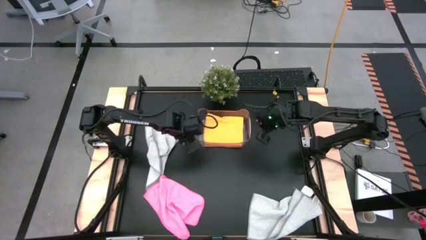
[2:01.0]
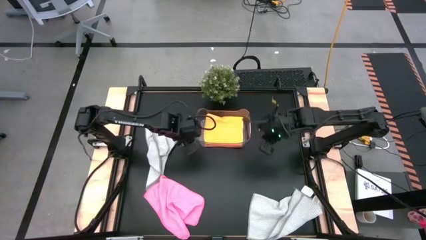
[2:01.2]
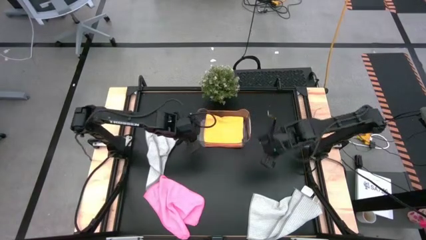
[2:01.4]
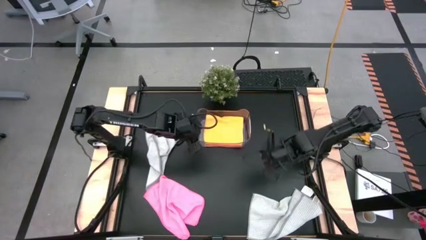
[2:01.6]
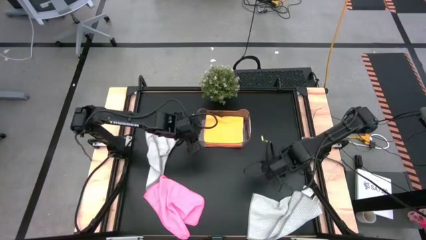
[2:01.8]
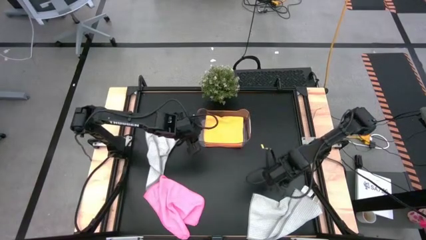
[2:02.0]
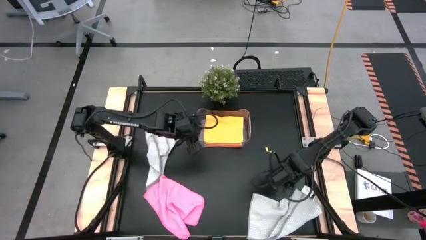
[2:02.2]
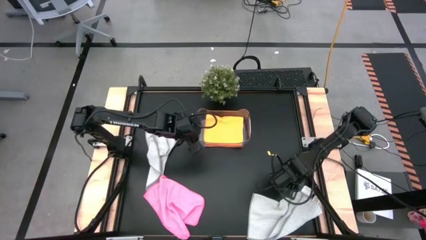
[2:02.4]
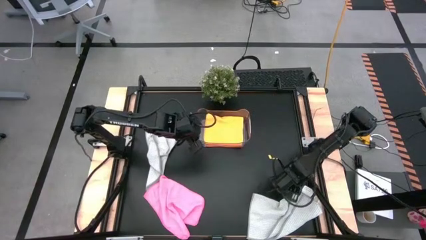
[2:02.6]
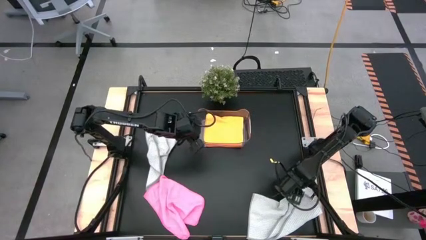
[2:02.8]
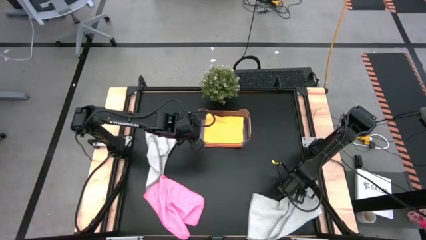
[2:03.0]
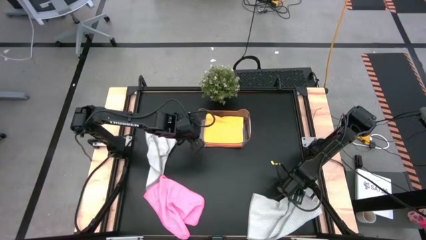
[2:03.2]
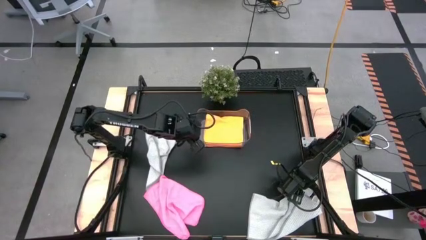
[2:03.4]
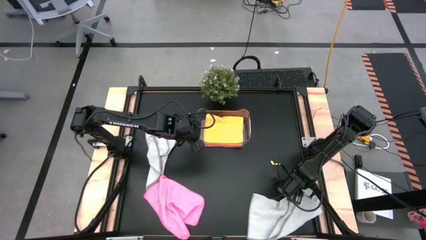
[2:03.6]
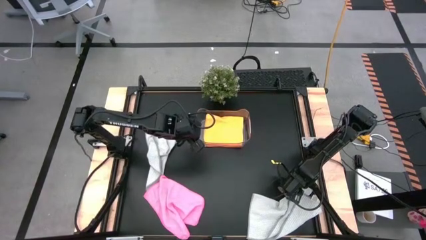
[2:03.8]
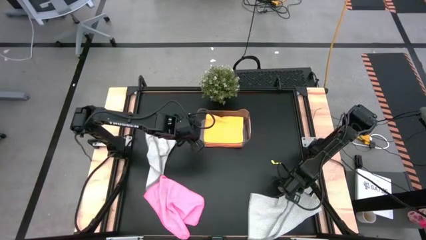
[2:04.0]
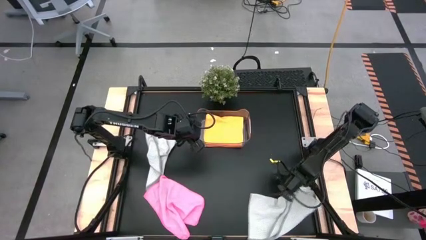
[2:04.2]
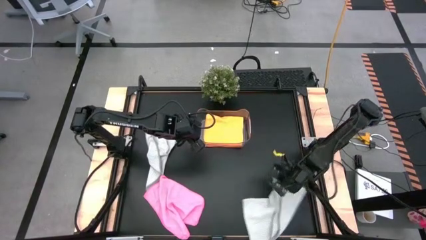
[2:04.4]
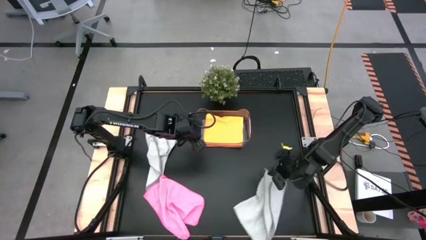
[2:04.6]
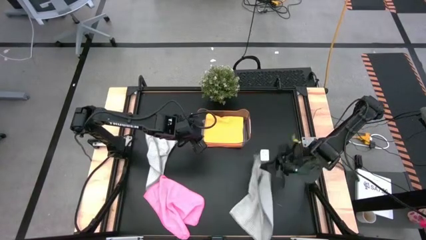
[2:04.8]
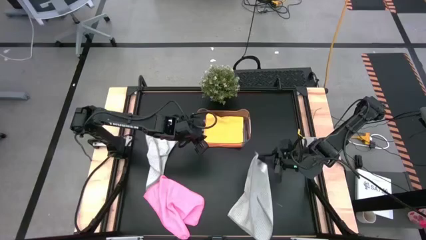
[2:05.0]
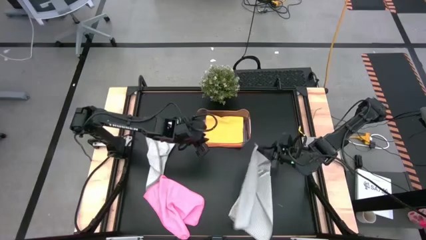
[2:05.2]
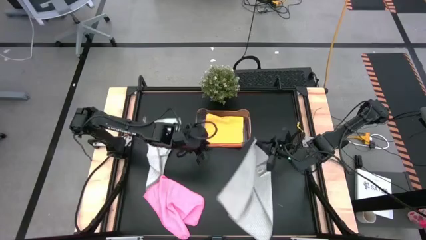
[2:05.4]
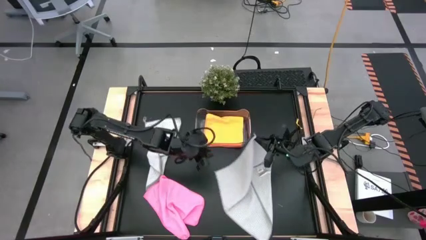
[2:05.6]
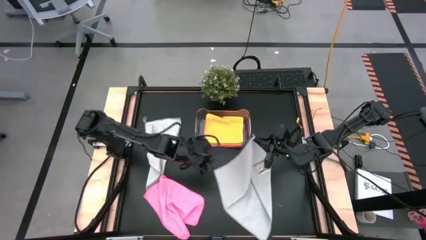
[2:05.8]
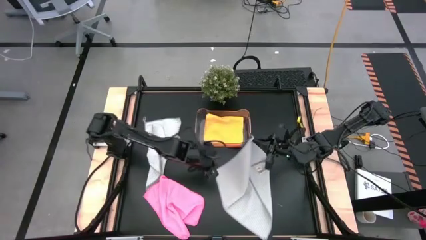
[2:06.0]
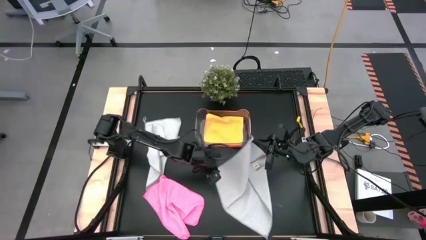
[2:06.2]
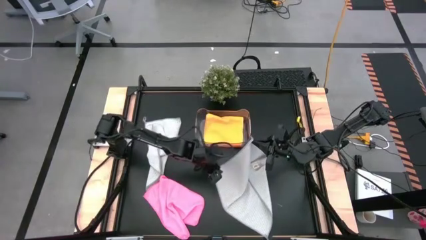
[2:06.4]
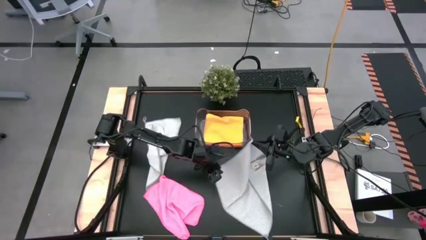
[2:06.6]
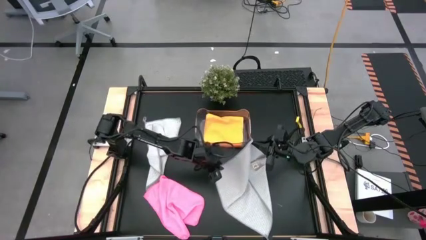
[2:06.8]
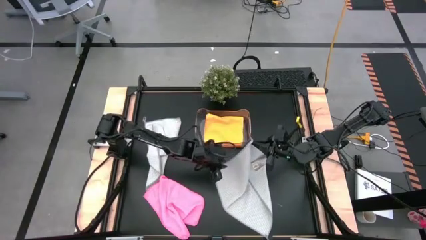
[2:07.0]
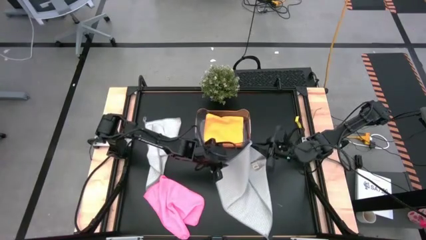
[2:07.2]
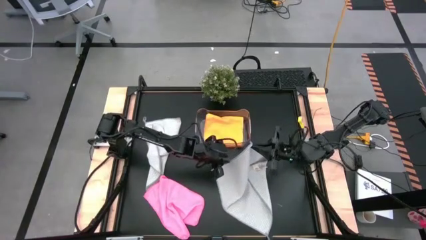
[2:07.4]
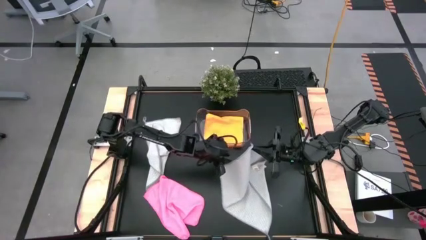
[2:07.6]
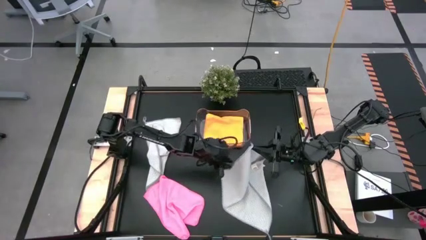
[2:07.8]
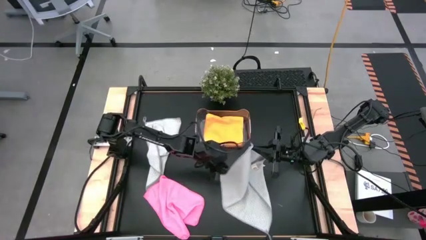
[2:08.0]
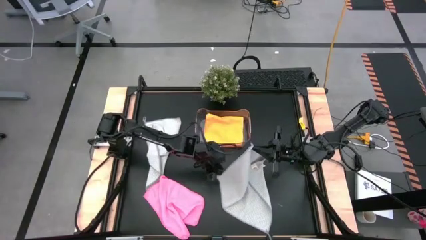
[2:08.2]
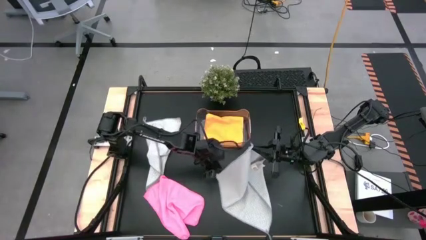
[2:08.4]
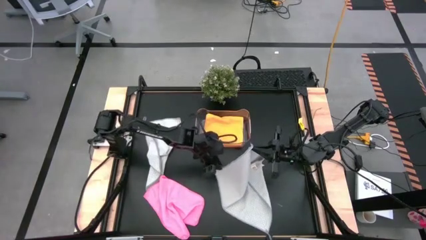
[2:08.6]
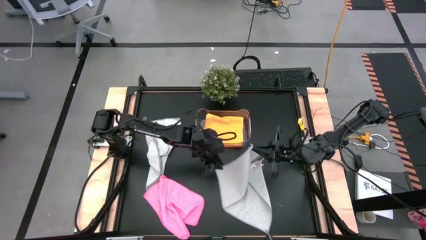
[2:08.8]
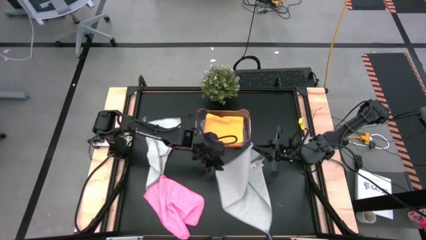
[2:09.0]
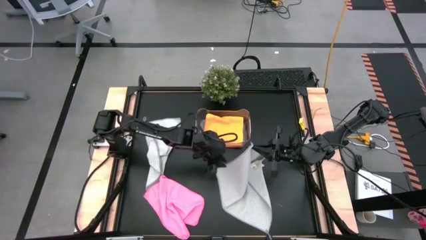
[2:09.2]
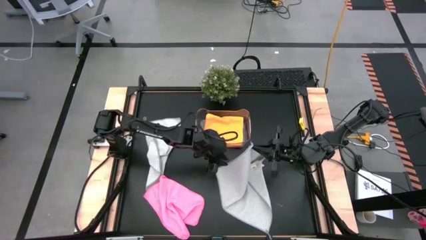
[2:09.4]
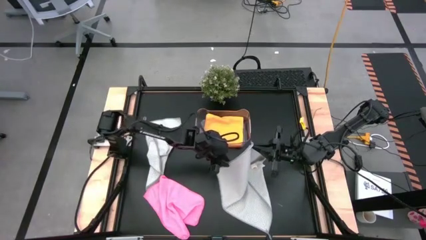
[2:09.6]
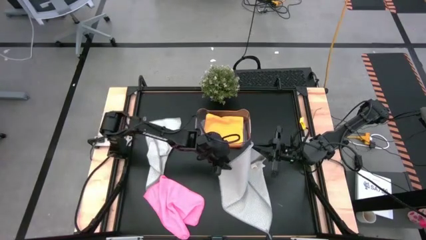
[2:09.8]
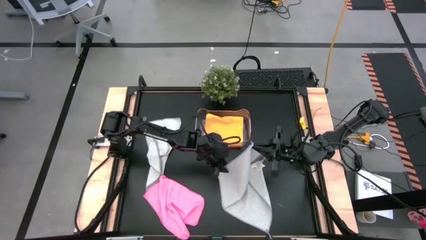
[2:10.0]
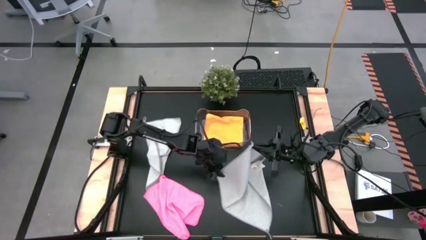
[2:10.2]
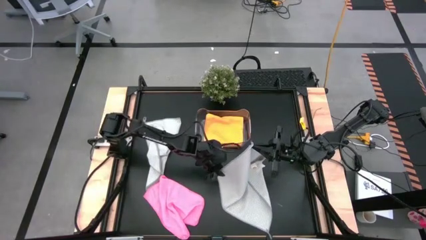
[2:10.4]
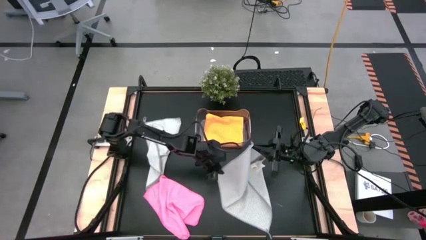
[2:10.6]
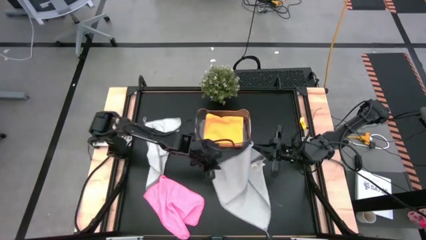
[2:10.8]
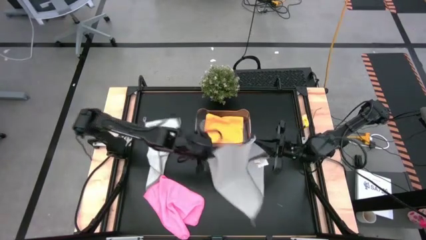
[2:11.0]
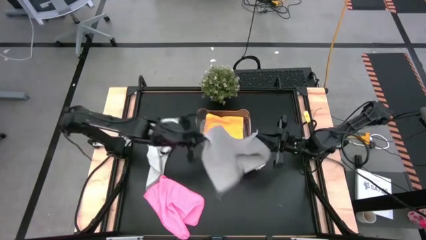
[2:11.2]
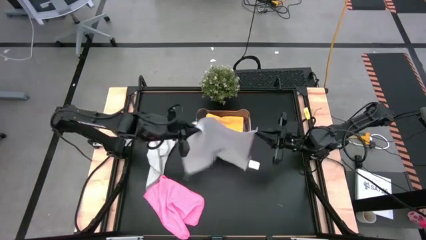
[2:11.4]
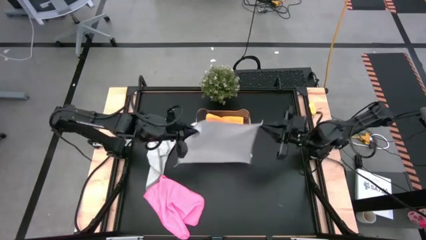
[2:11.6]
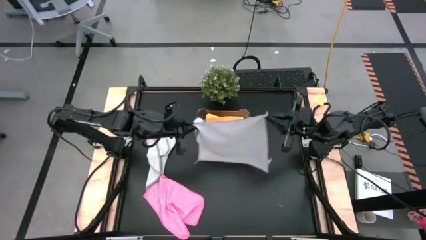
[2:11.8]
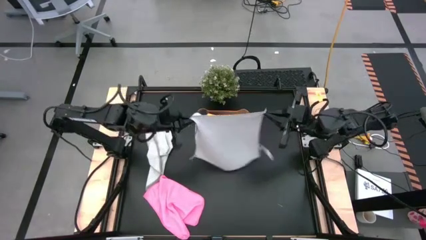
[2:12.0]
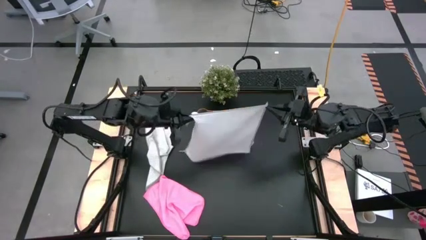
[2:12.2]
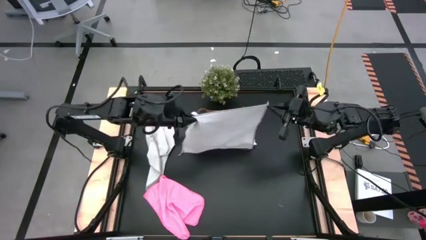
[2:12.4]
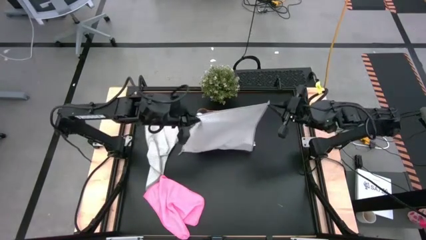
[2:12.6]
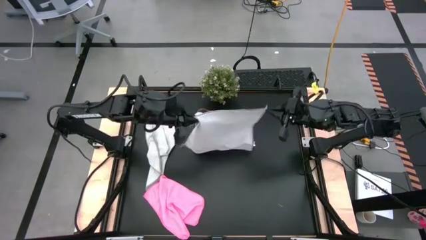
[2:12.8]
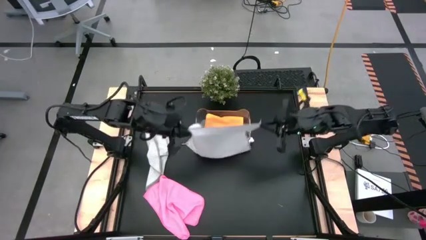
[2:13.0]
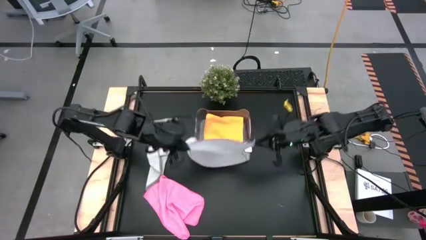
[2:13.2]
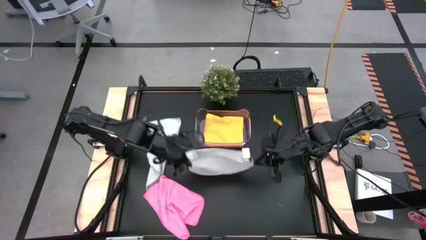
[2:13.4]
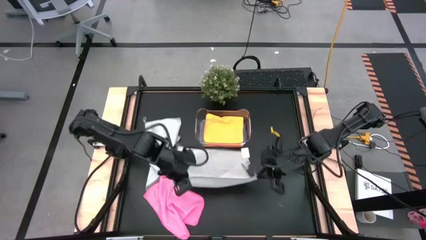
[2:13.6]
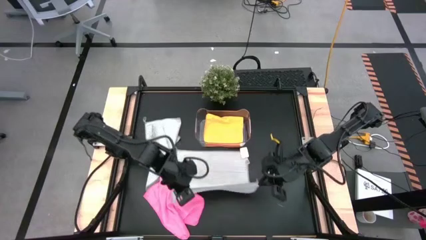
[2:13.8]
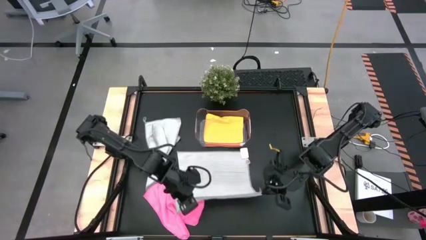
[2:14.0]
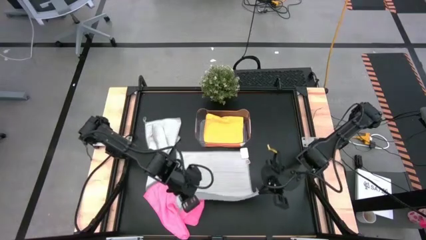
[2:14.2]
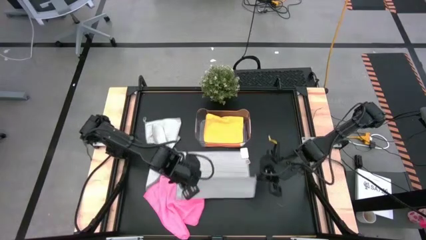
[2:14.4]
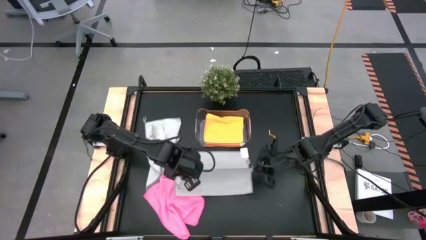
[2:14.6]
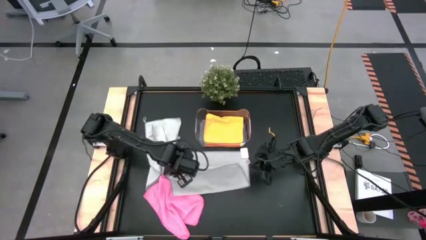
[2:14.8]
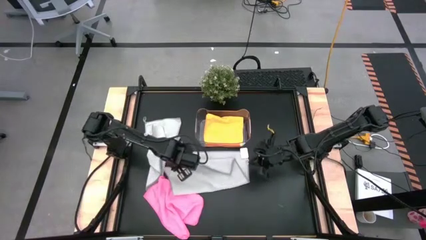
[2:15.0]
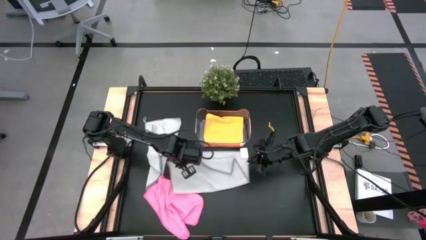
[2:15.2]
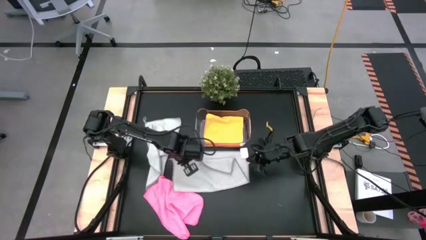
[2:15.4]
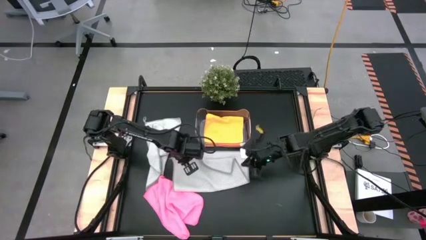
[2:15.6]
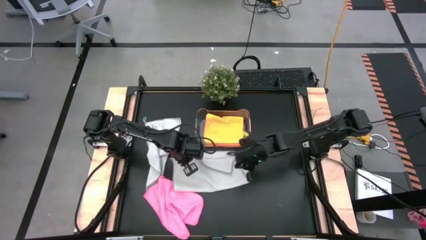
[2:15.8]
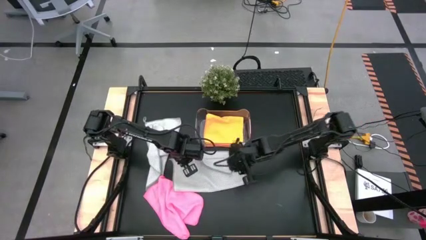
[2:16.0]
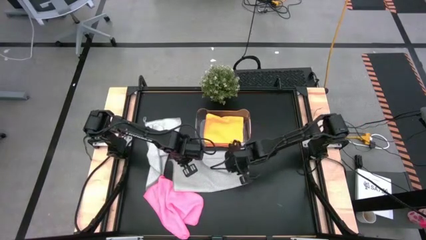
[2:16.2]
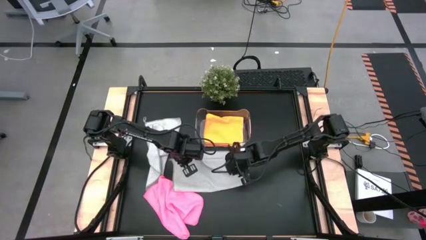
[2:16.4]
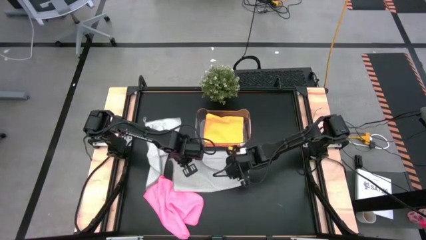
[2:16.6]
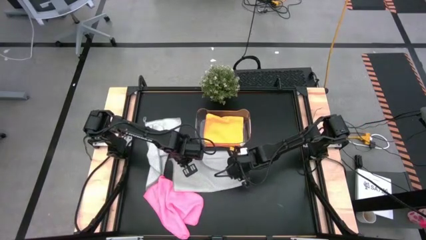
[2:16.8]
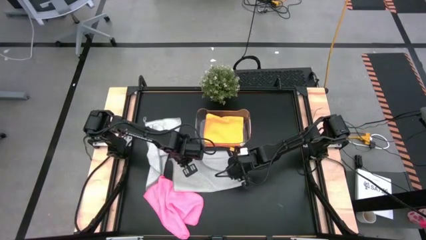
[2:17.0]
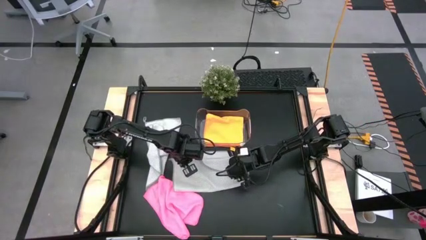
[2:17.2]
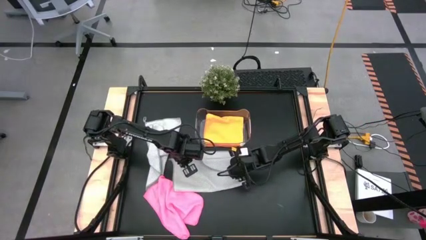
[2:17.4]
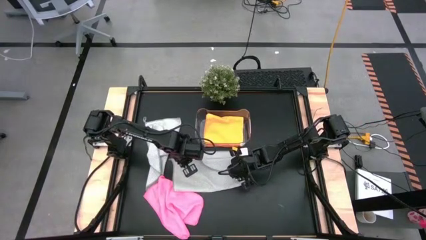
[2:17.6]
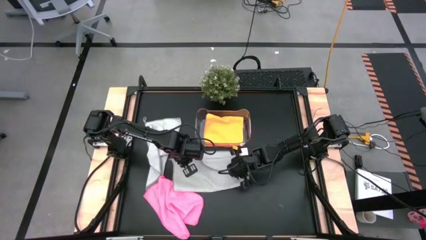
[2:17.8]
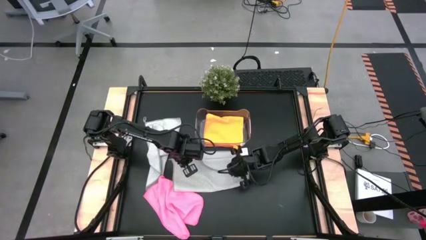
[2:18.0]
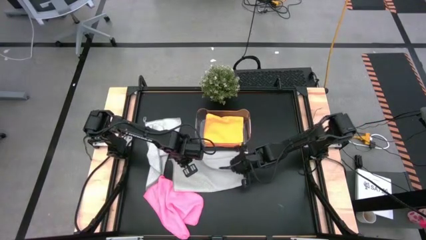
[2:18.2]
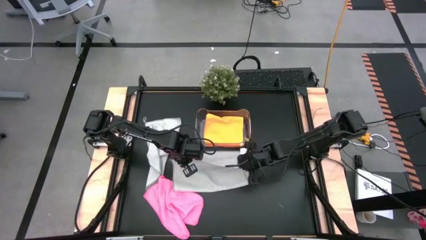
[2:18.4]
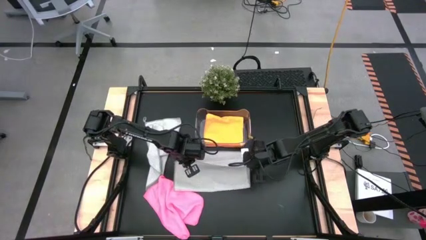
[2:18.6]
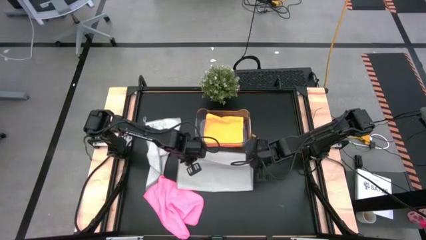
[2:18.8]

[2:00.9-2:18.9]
Task: Fold microfiber towels
Fold the bottom gray microfiber towel on the table
